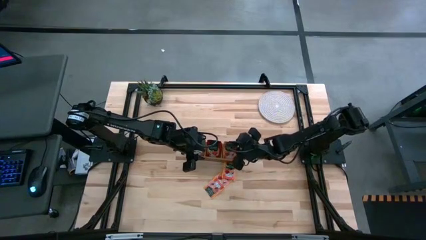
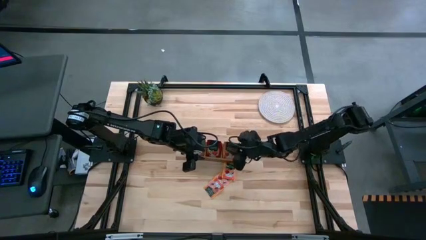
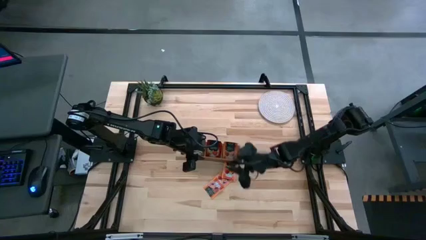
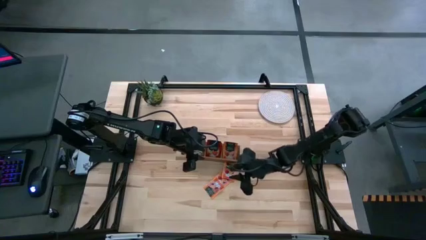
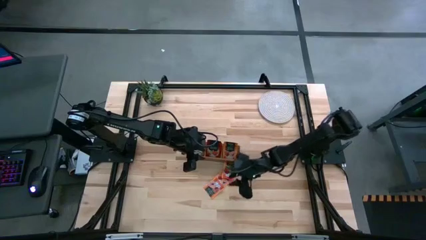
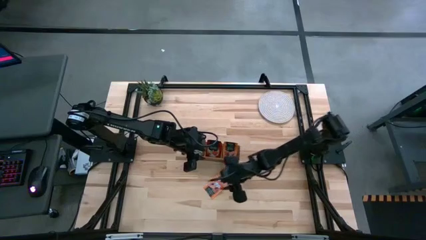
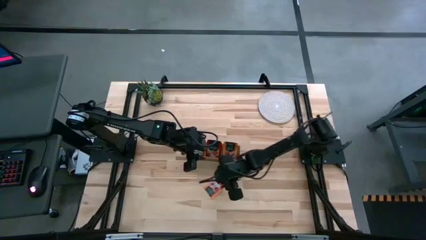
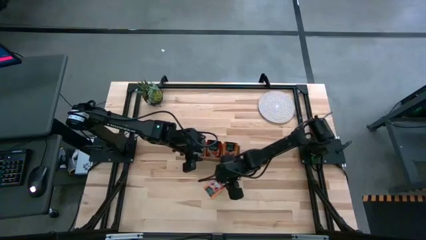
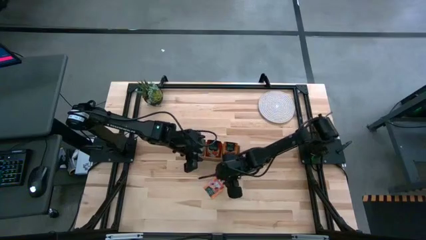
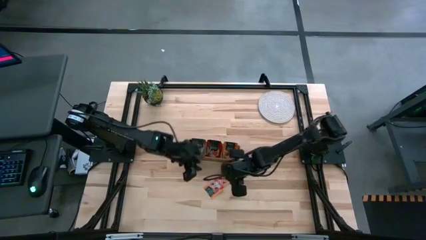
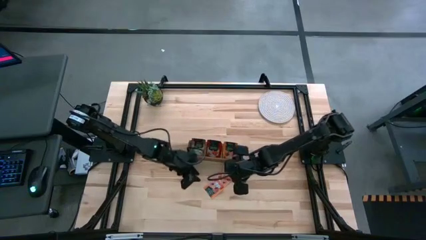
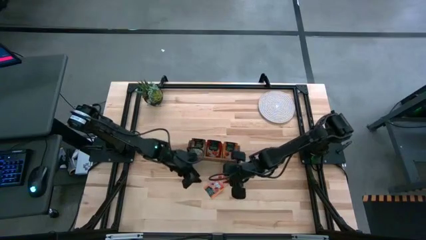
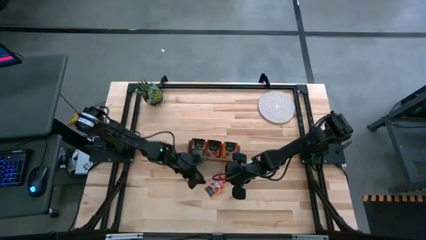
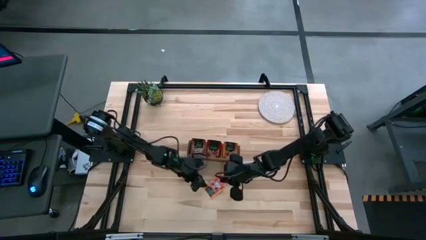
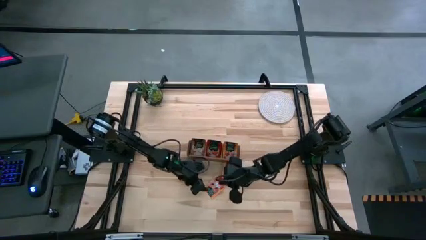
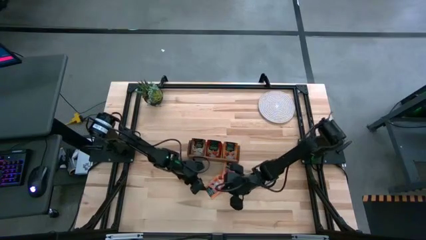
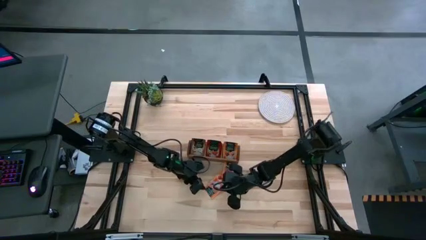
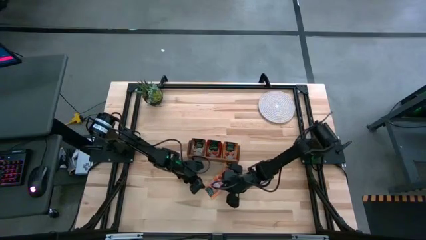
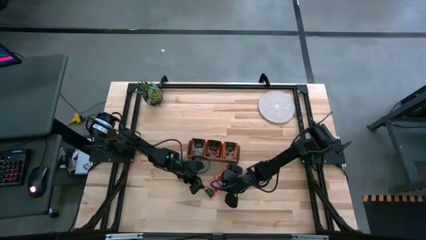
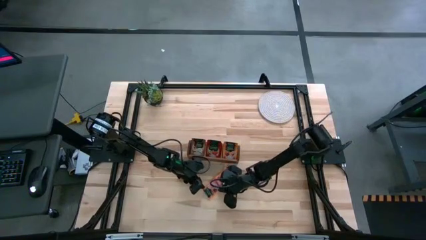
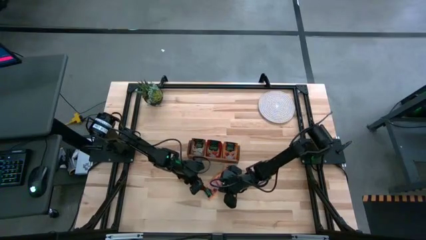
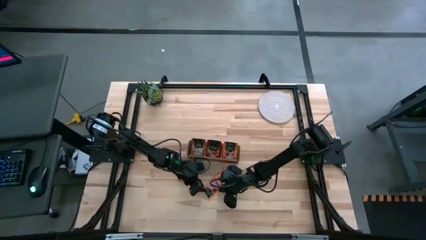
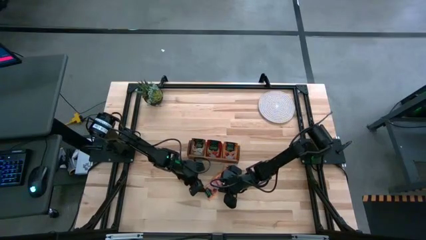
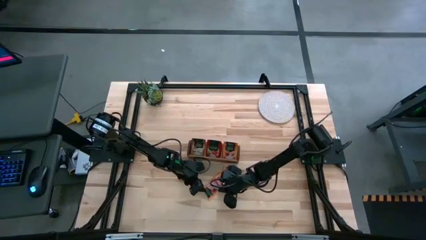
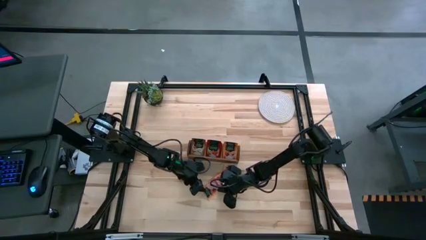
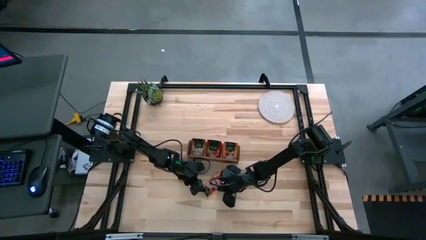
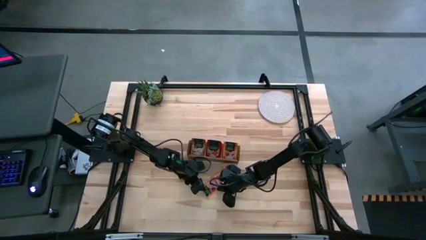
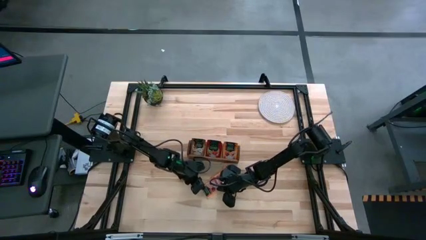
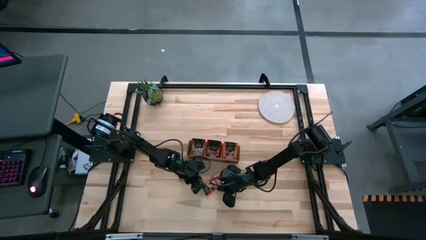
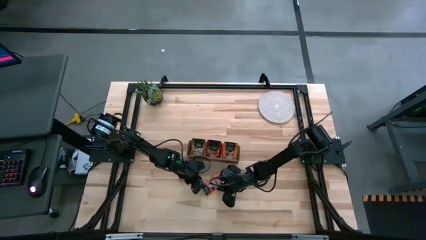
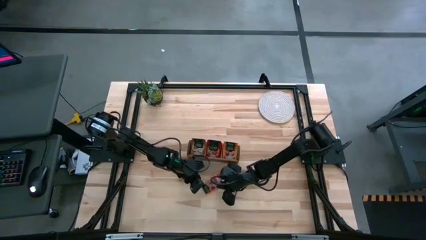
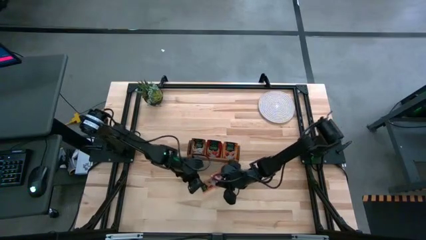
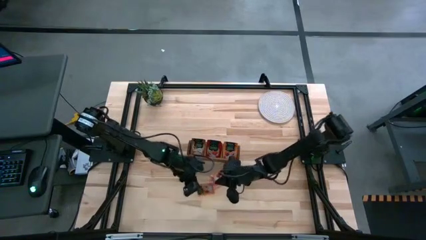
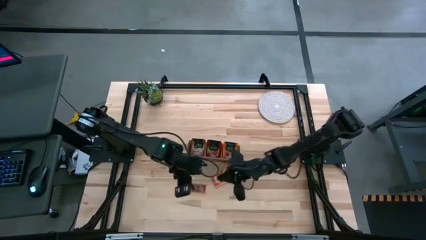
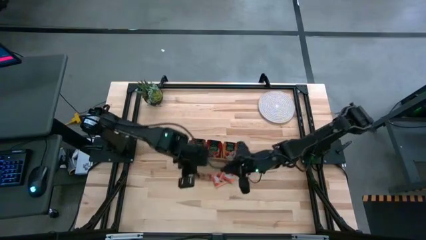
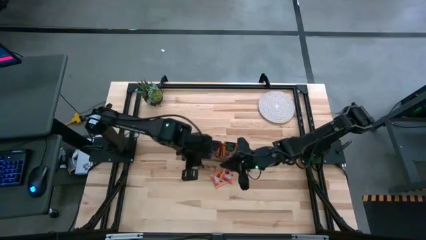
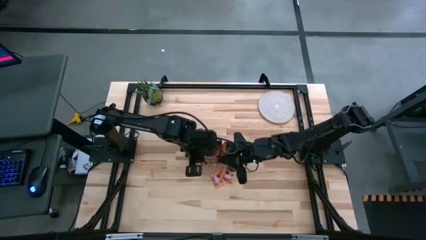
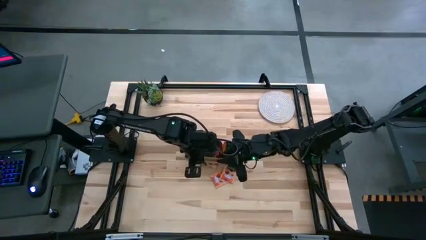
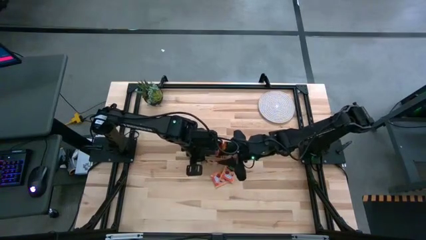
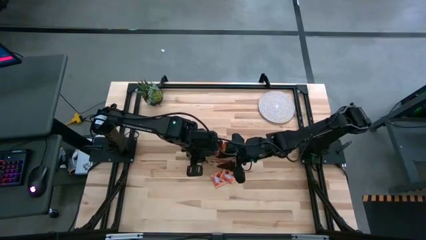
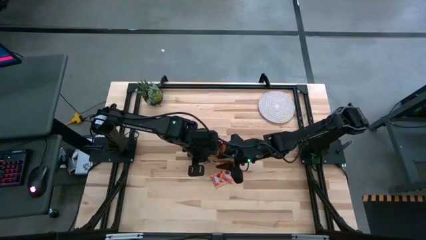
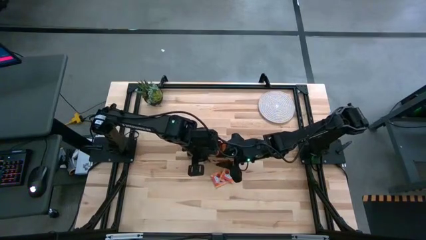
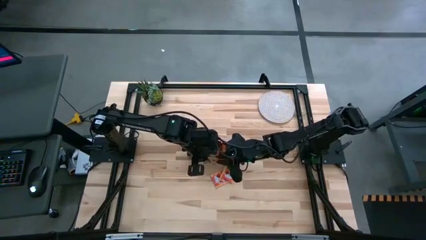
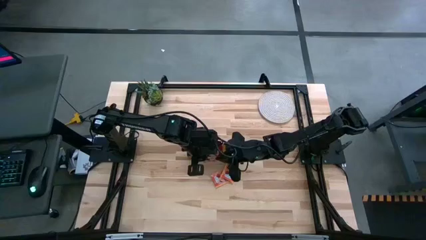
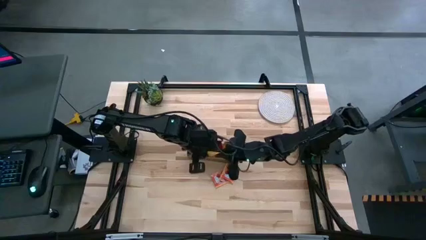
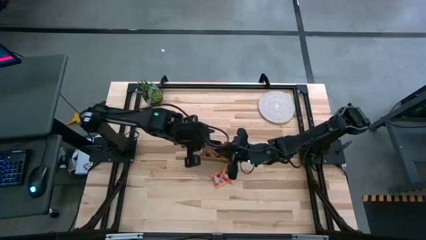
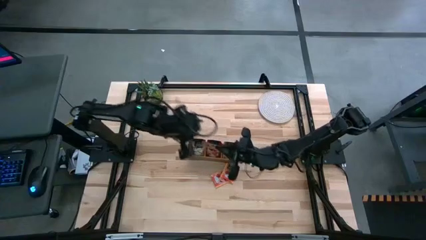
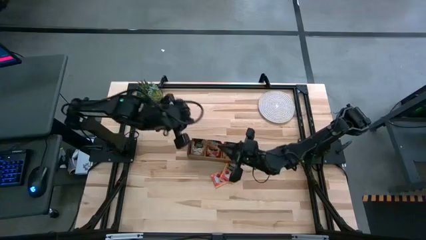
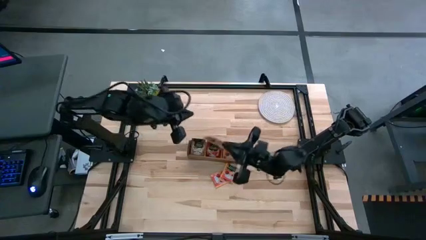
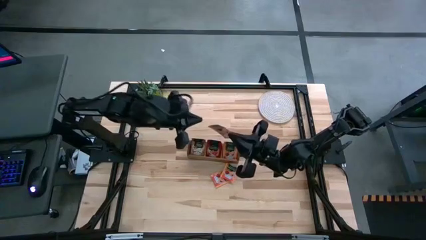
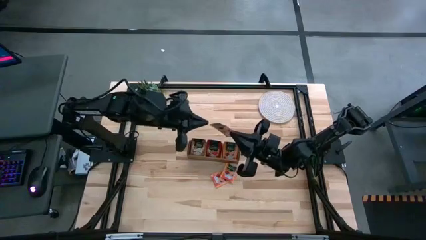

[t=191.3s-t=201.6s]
Task: Pick & Place Tea
Put the orange tea bag into the right section of the brown wooden organizer
